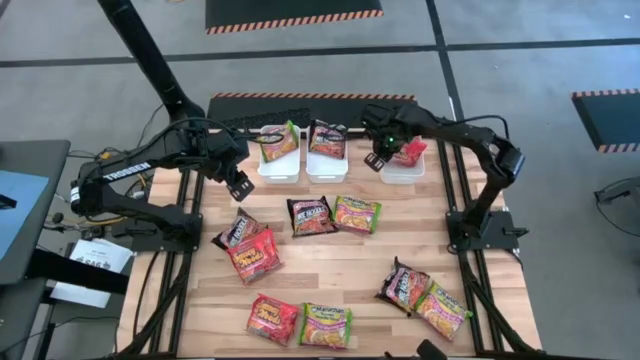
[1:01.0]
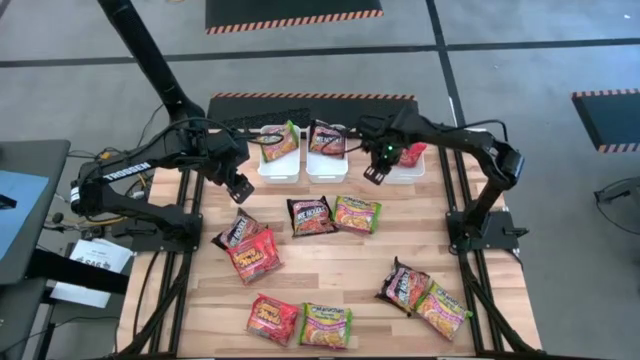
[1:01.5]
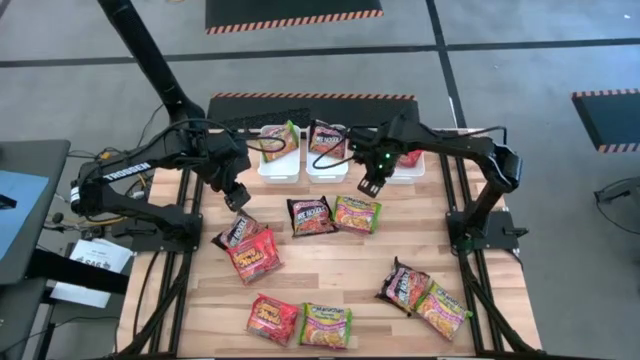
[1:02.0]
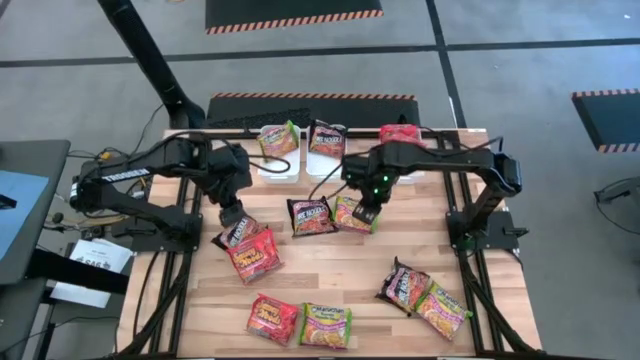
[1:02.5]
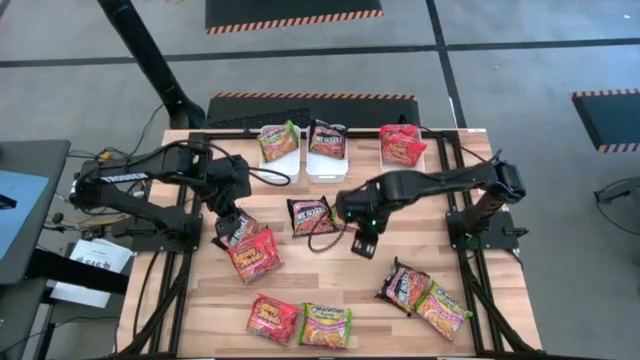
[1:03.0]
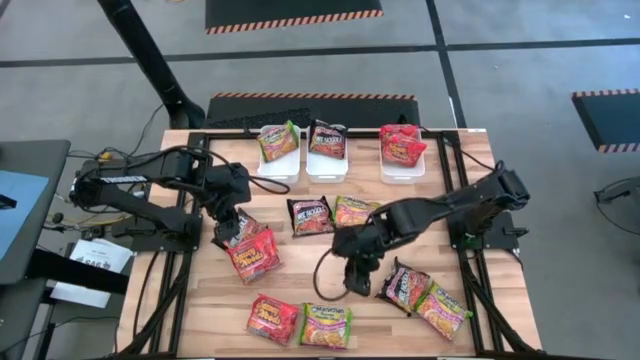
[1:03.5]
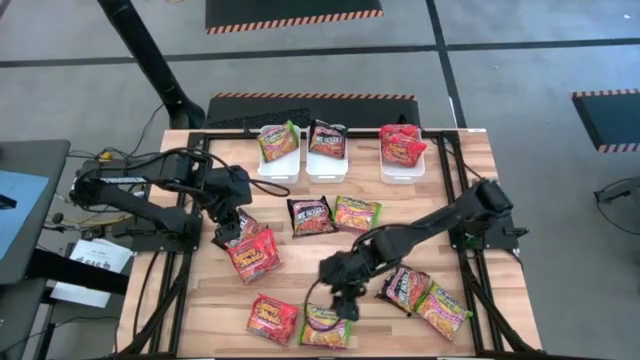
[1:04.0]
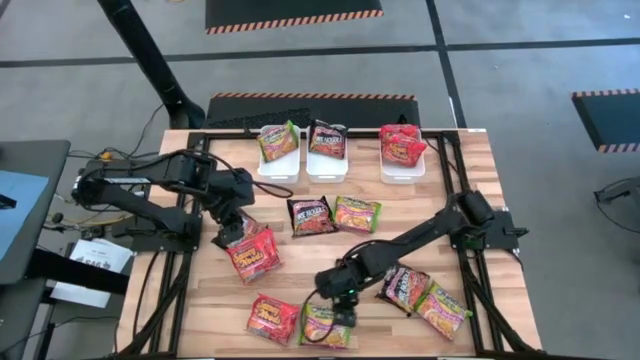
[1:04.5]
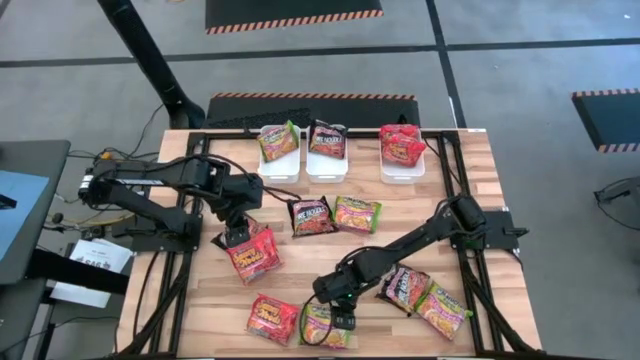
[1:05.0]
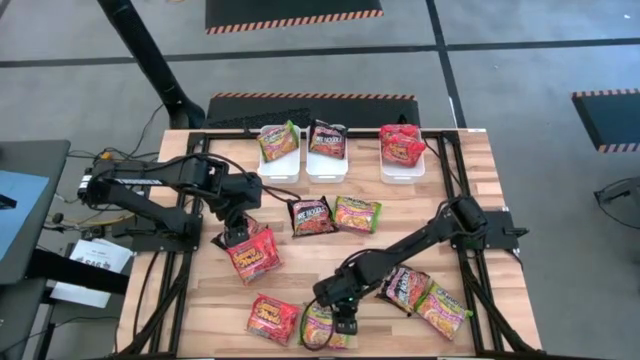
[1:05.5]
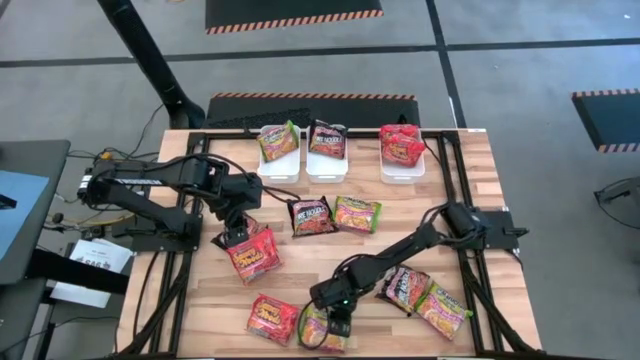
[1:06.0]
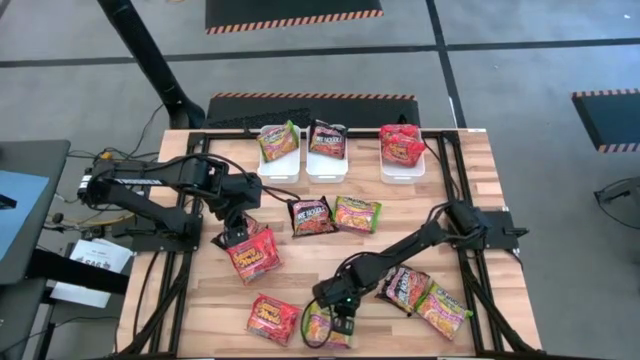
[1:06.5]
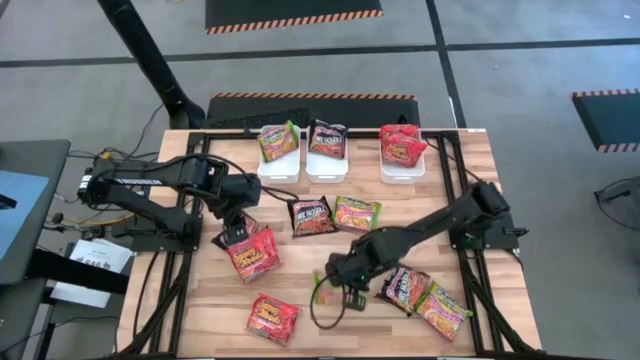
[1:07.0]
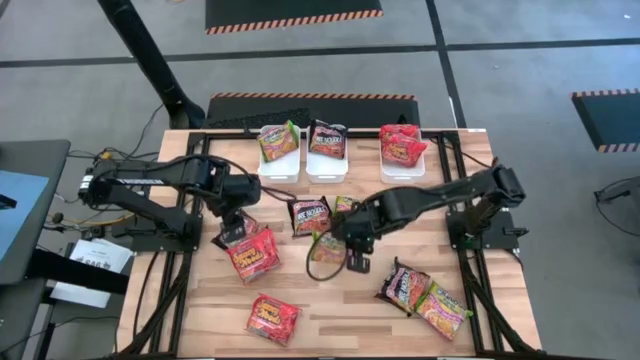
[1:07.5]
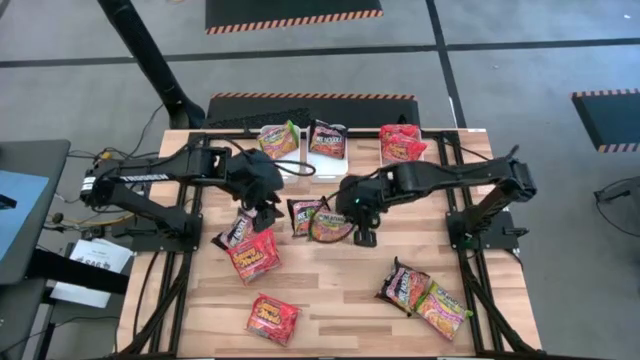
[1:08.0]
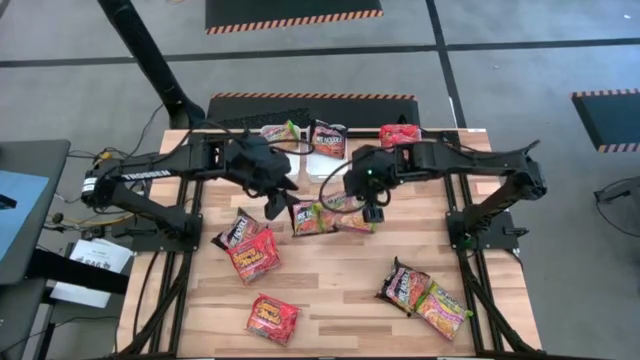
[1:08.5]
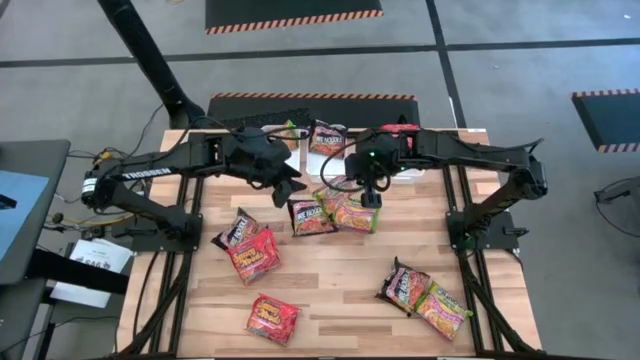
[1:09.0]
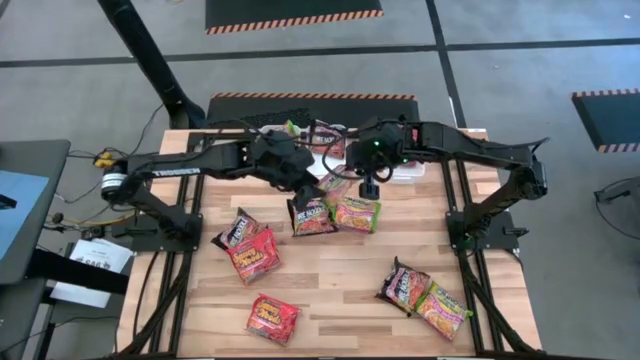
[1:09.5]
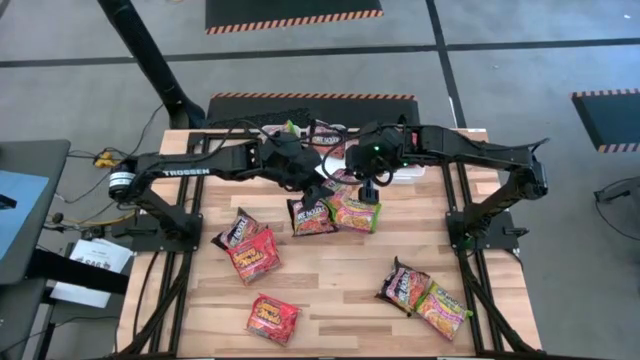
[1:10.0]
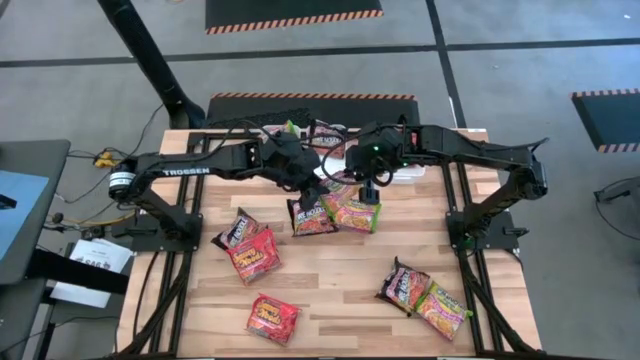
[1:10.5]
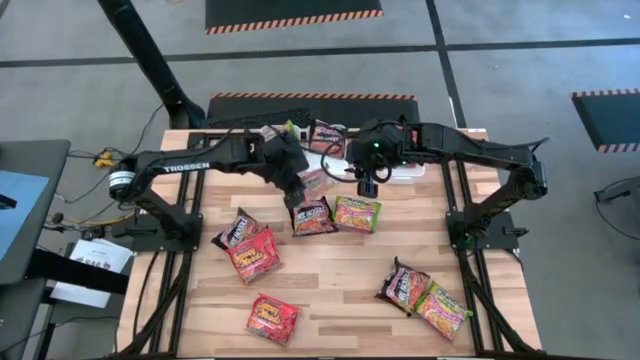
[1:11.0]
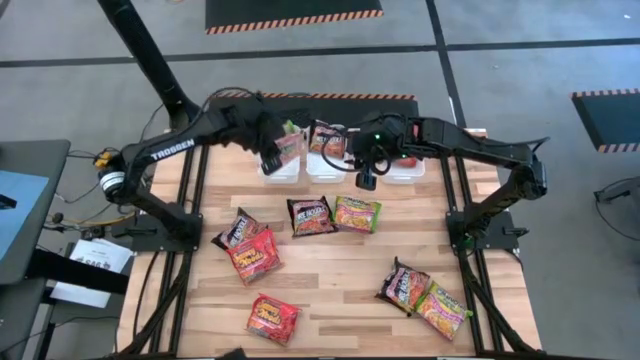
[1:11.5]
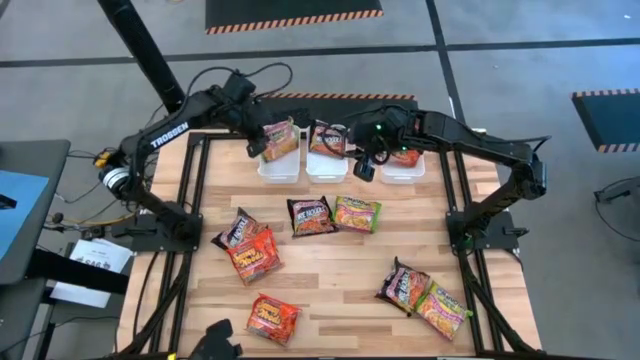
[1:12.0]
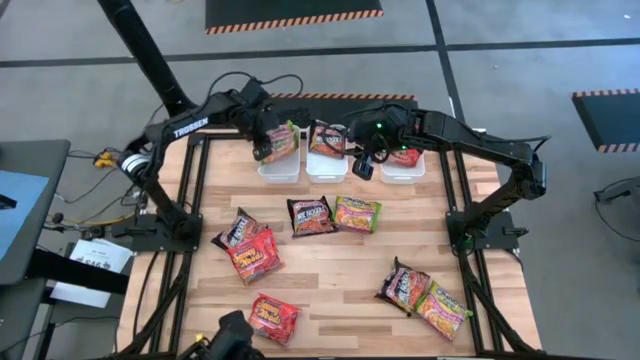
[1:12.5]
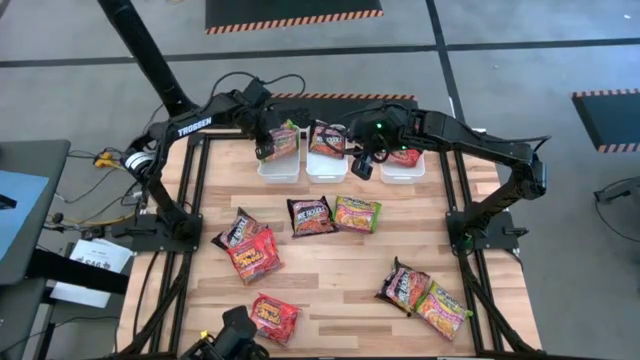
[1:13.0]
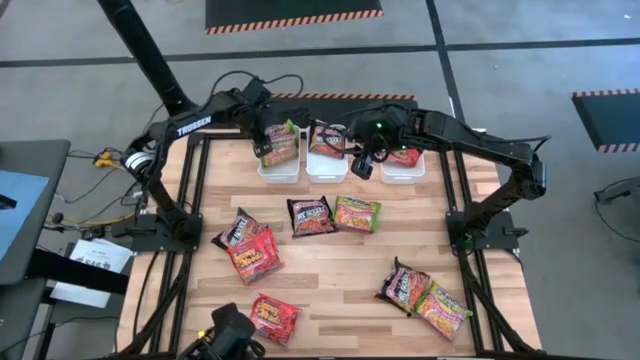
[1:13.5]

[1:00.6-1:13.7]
Task: Sort Maruchan noodles
Put the green noodle pack into the left white bin

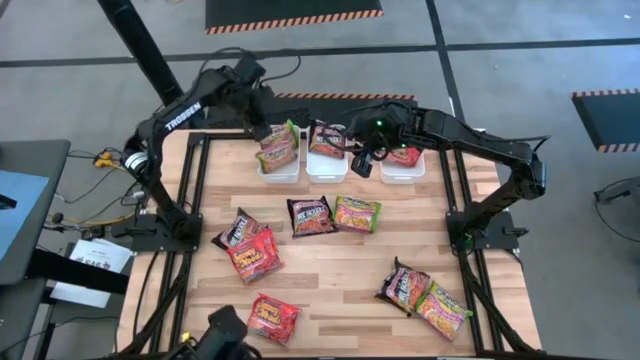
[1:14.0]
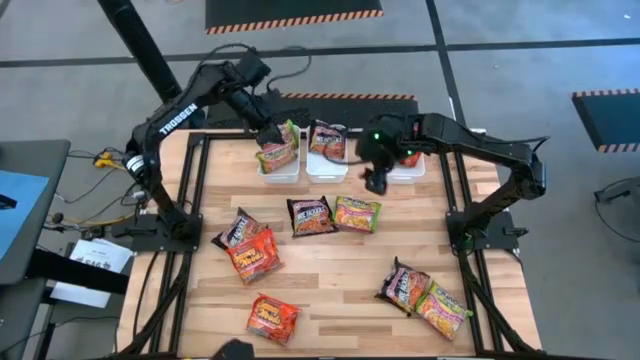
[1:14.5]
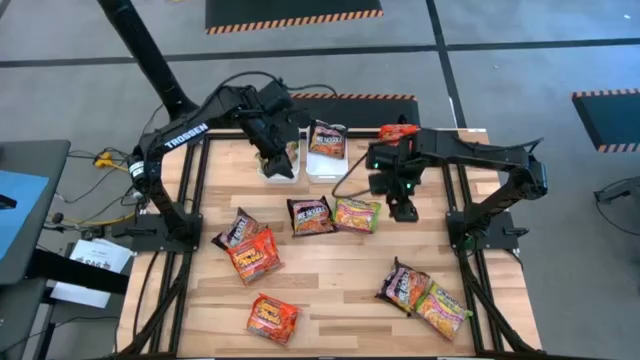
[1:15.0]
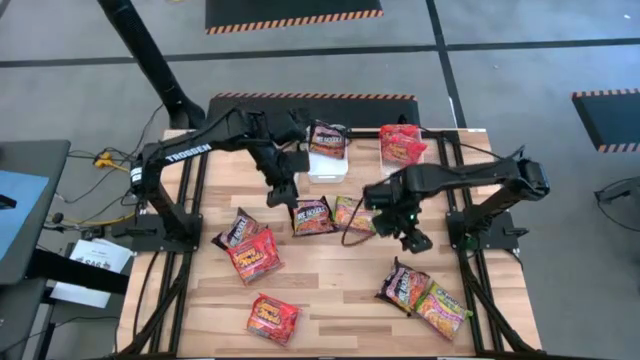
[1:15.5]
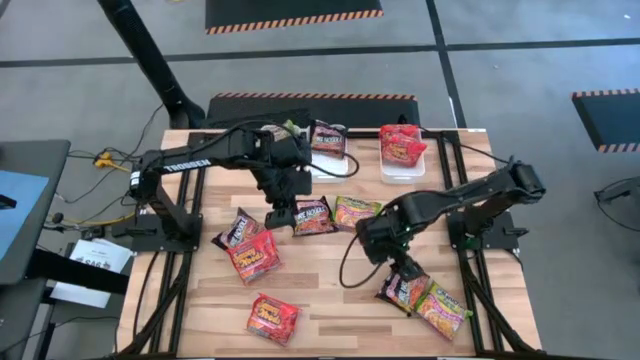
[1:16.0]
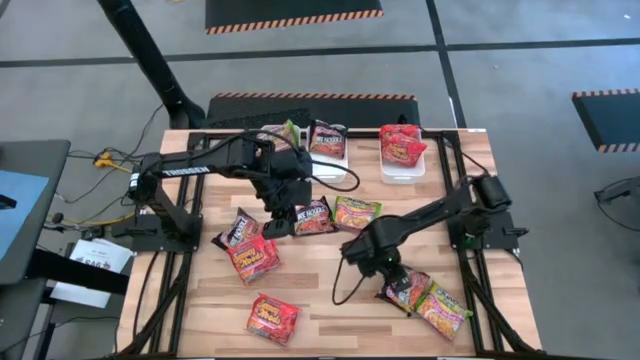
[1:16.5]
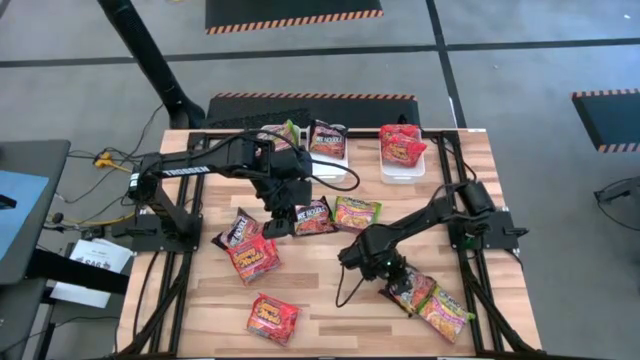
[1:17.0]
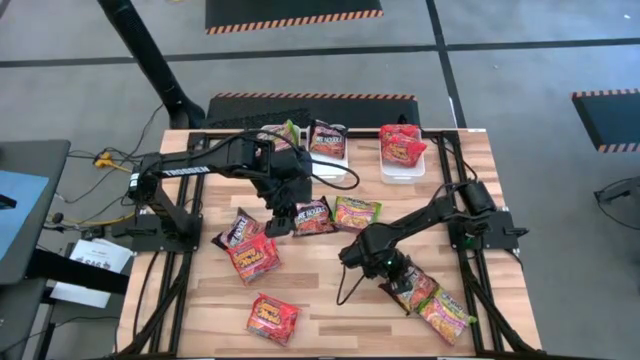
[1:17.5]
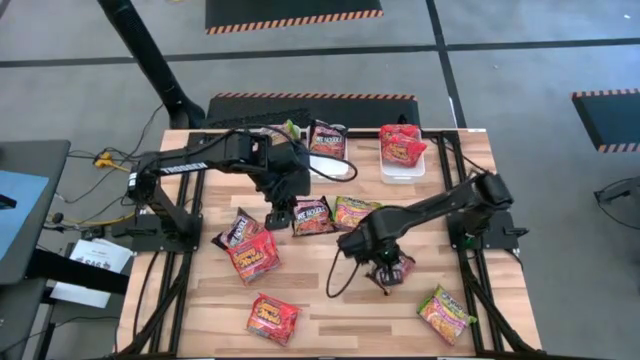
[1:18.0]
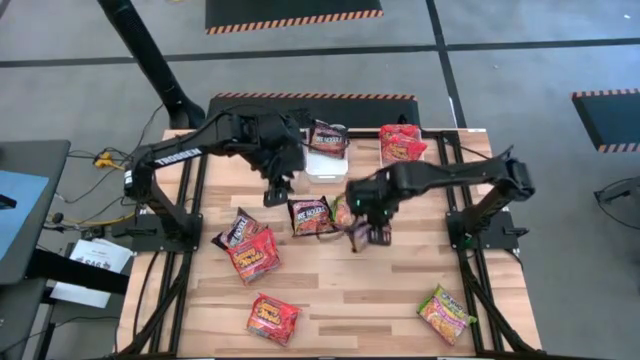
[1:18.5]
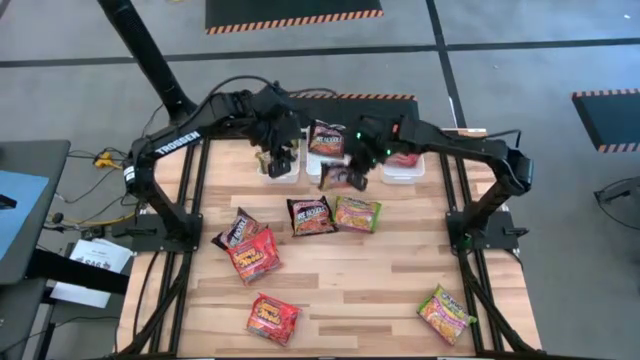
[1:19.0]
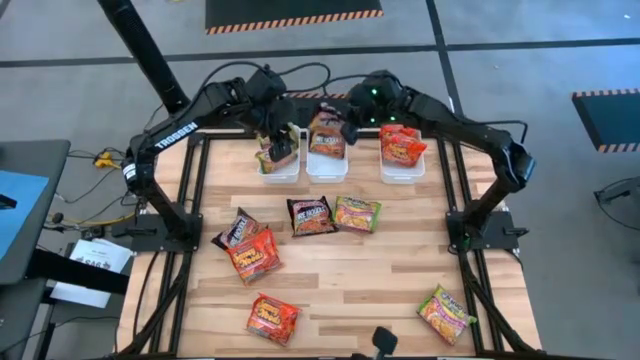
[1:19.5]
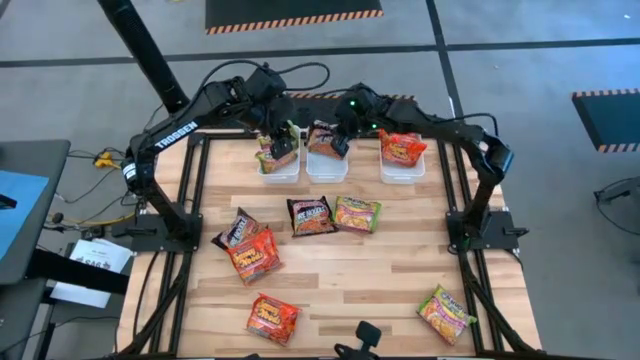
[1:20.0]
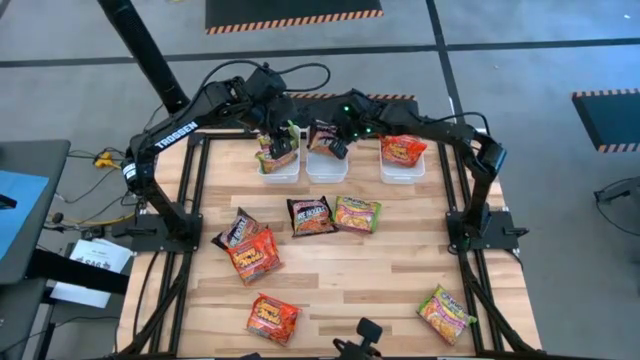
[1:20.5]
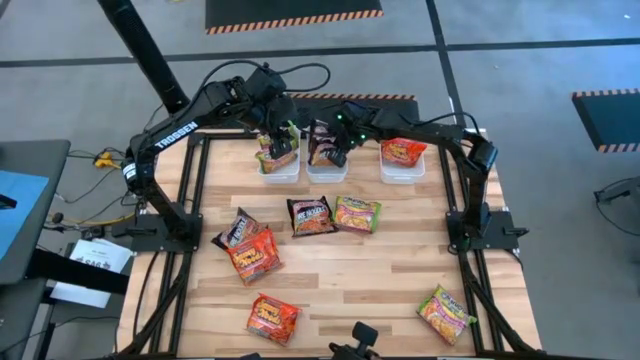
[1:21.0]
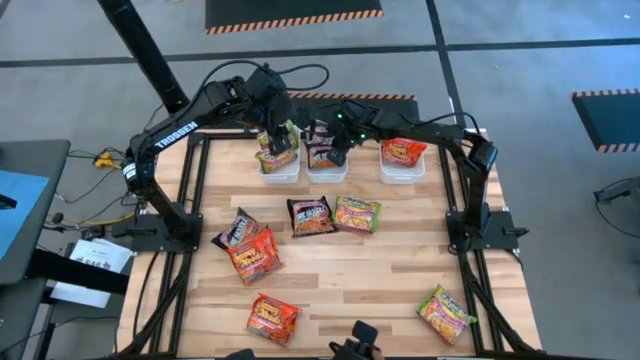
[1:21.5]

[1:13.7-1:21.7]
Put the black noodle pack into the middle white bin

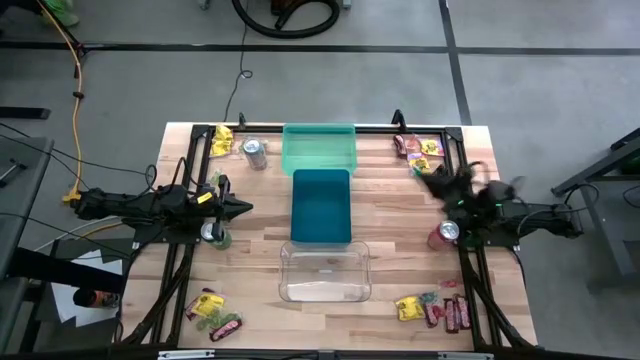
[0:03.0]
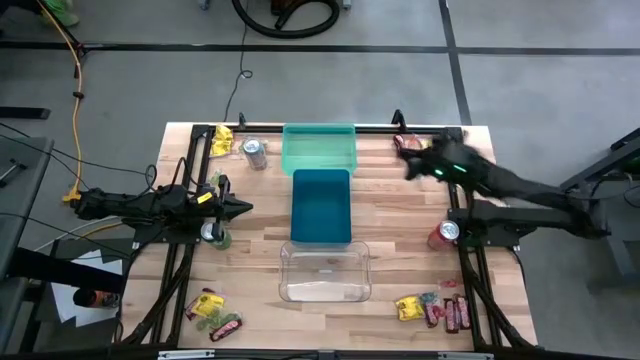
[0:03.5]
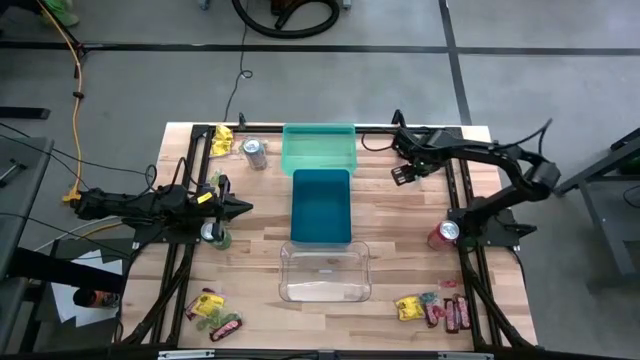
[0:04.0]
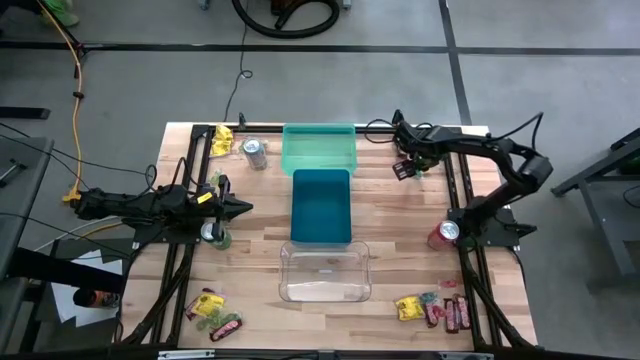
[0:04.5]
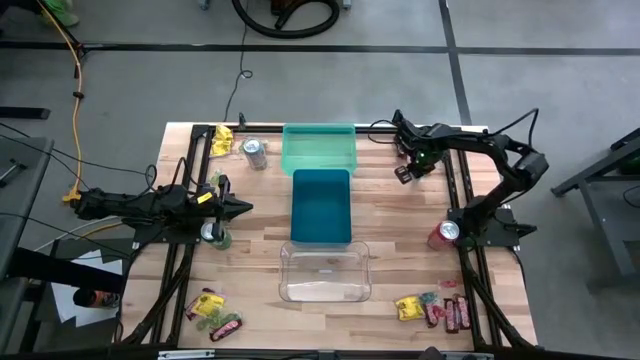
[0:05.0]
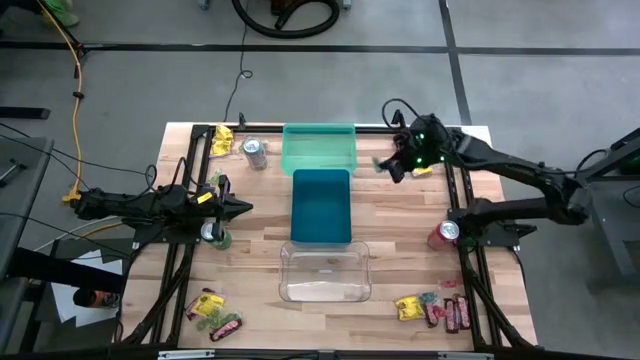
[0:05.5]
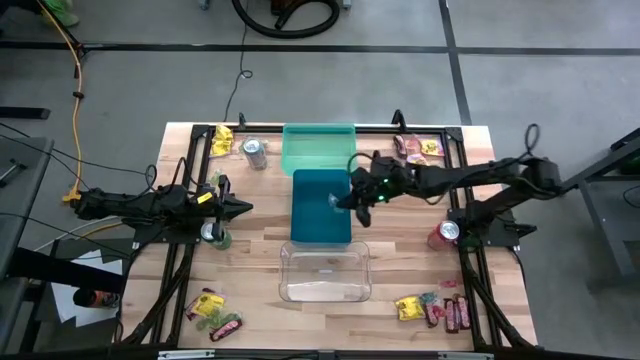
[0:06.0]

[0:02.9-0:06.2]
Task: Sort candy
Put the blue candy into the blue bin
